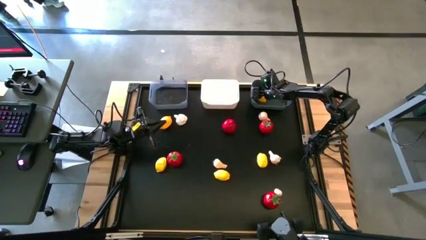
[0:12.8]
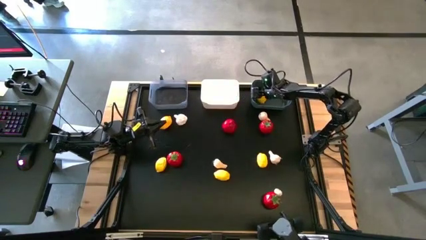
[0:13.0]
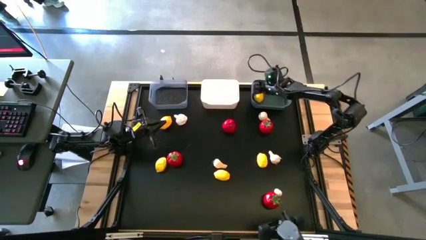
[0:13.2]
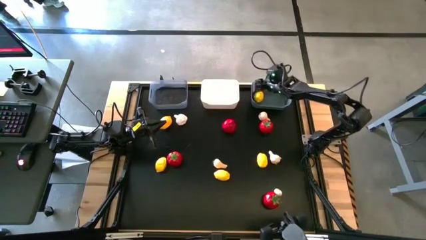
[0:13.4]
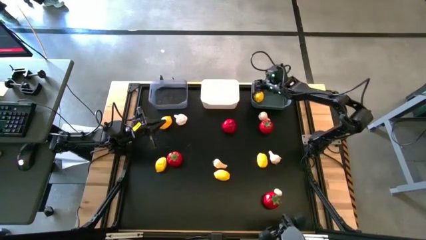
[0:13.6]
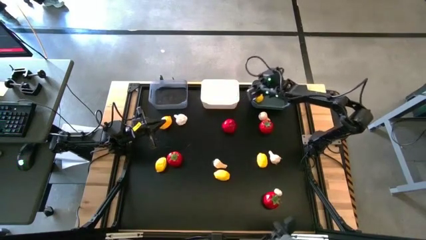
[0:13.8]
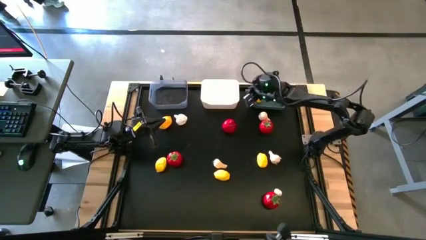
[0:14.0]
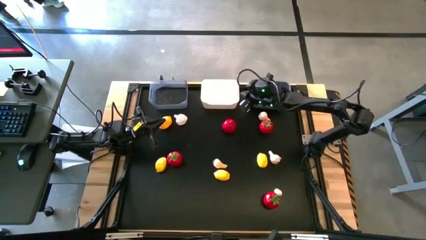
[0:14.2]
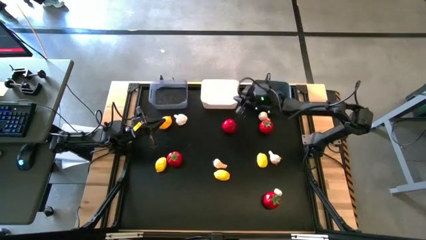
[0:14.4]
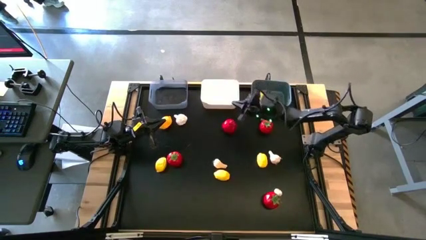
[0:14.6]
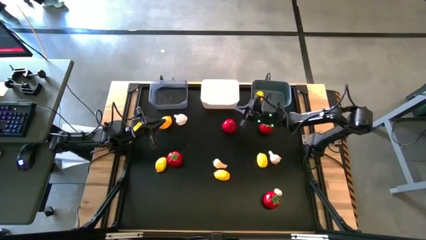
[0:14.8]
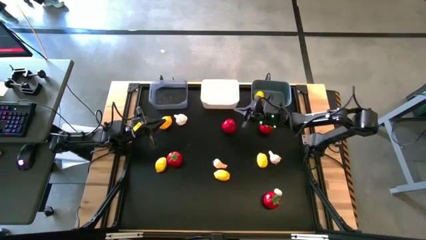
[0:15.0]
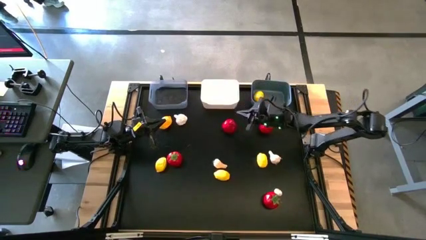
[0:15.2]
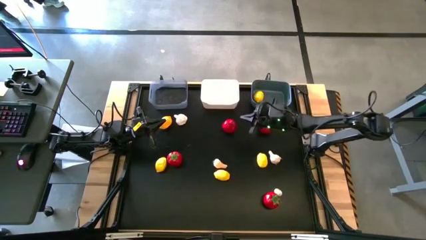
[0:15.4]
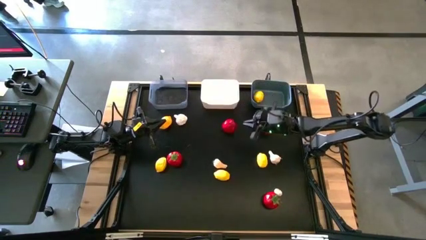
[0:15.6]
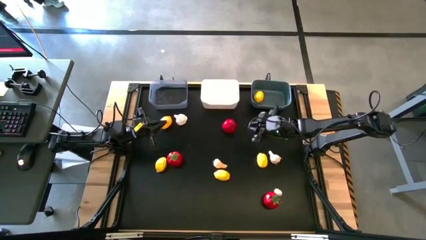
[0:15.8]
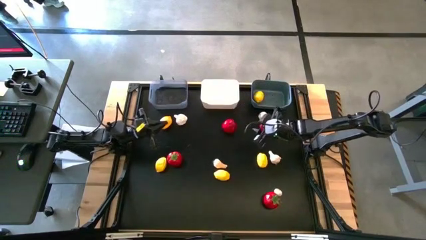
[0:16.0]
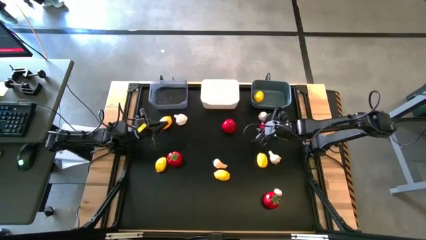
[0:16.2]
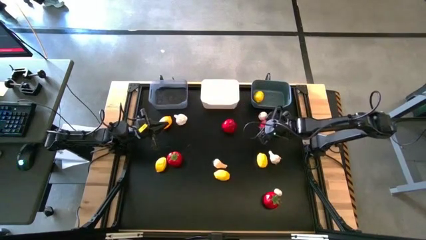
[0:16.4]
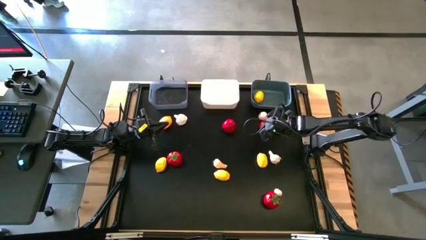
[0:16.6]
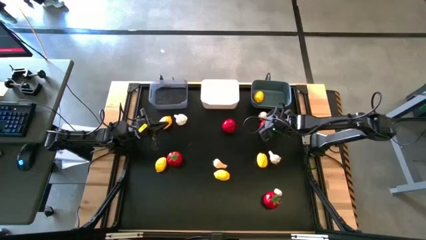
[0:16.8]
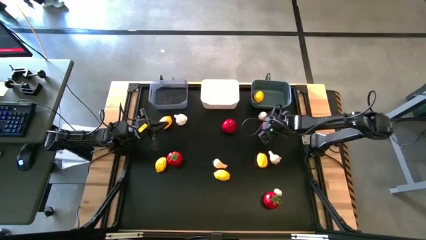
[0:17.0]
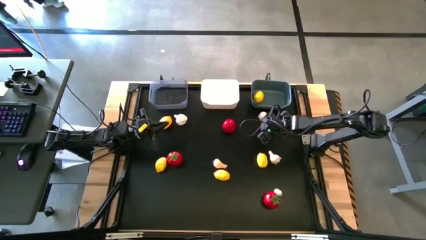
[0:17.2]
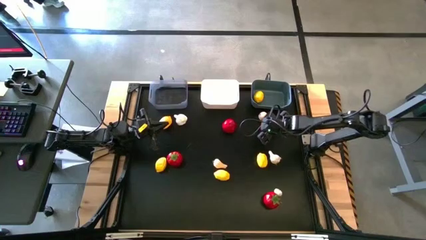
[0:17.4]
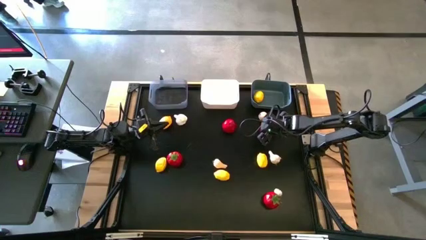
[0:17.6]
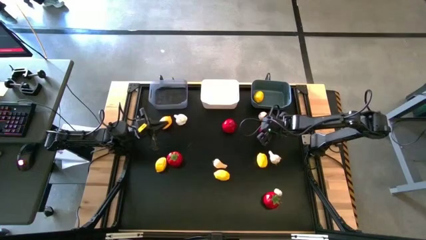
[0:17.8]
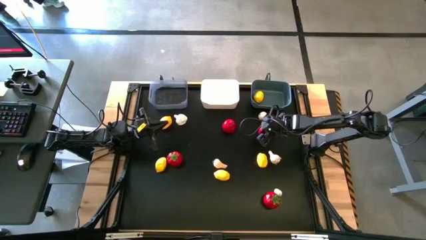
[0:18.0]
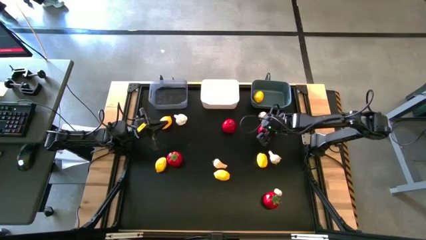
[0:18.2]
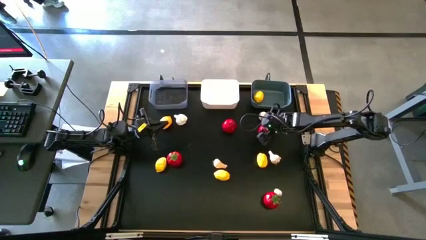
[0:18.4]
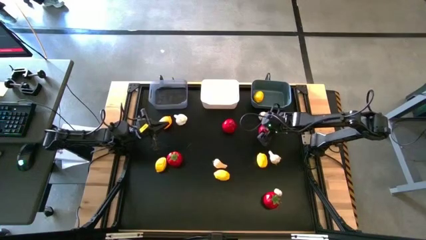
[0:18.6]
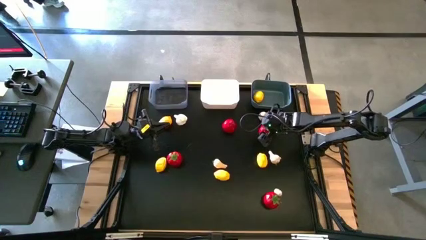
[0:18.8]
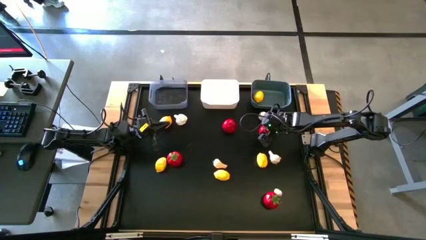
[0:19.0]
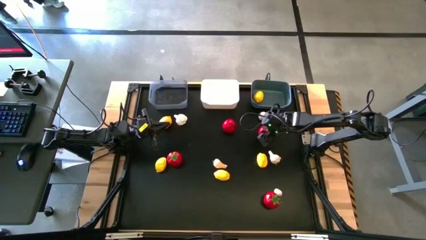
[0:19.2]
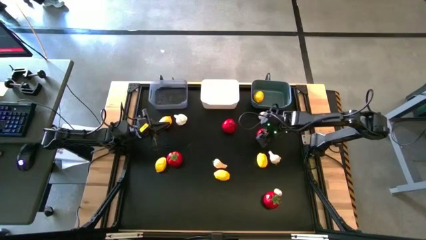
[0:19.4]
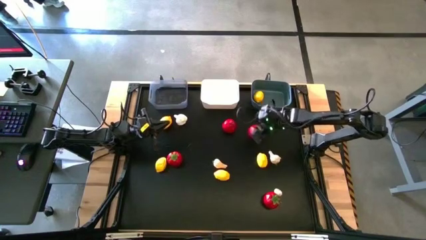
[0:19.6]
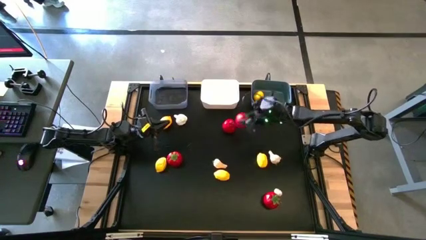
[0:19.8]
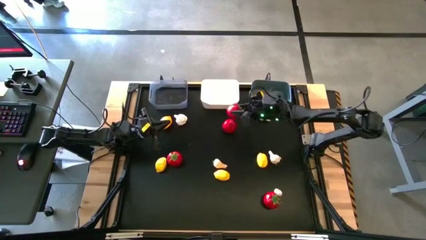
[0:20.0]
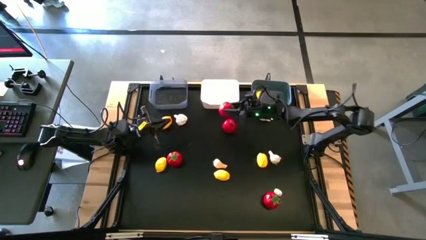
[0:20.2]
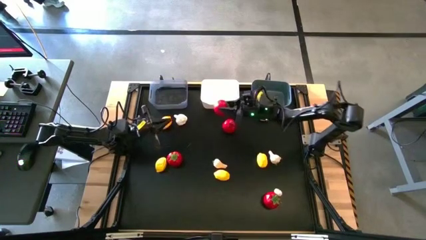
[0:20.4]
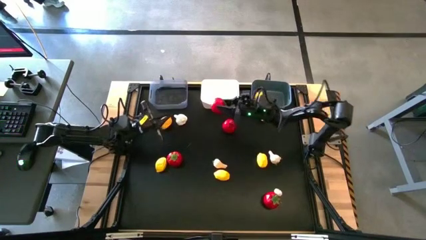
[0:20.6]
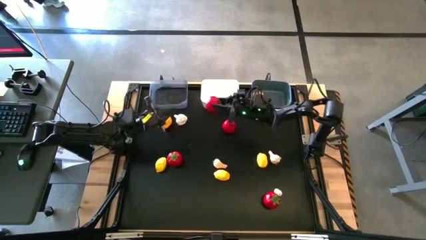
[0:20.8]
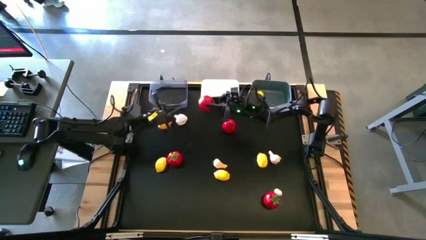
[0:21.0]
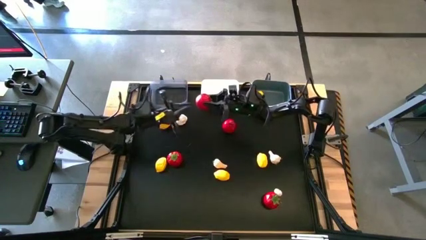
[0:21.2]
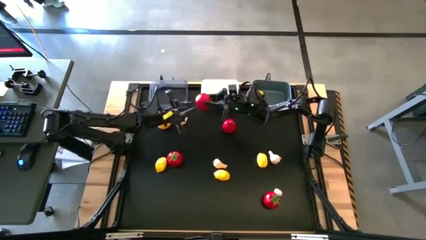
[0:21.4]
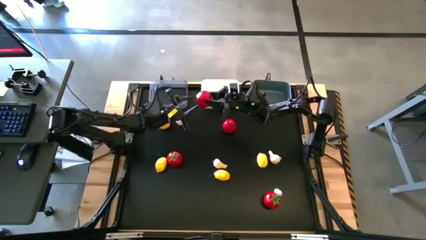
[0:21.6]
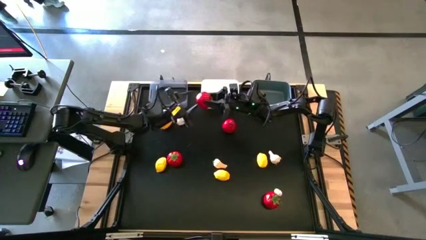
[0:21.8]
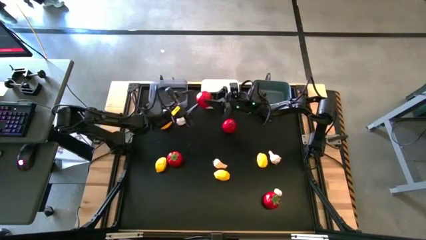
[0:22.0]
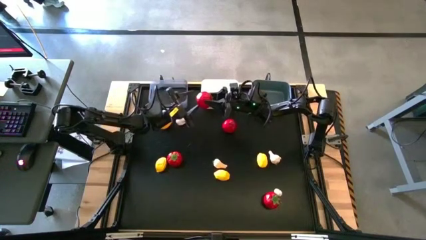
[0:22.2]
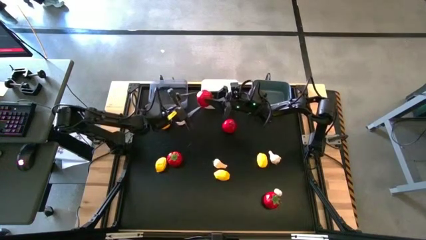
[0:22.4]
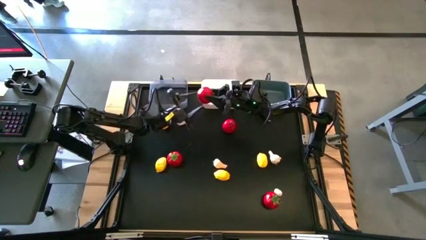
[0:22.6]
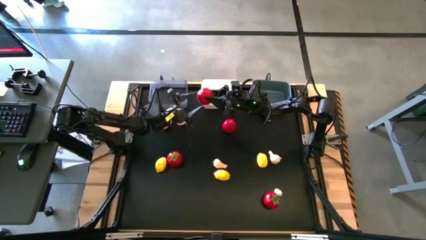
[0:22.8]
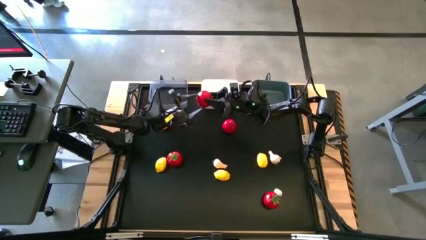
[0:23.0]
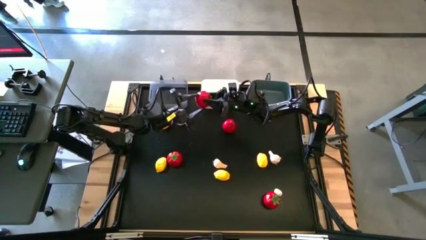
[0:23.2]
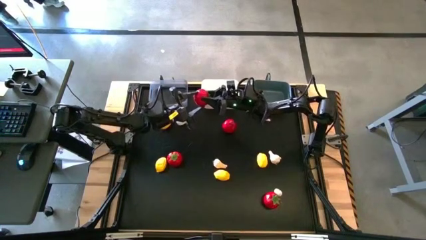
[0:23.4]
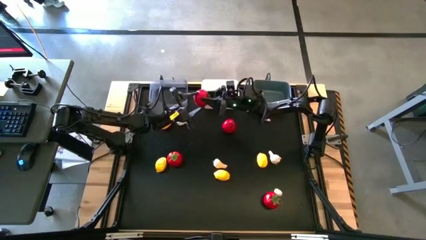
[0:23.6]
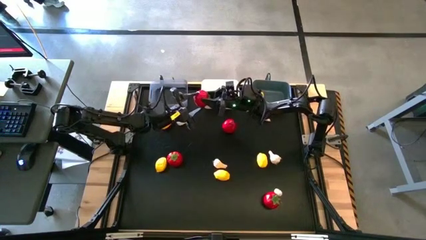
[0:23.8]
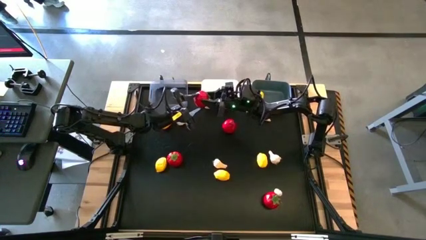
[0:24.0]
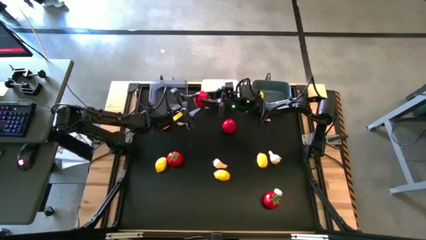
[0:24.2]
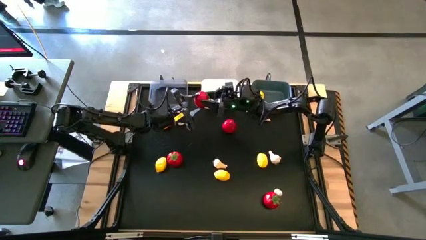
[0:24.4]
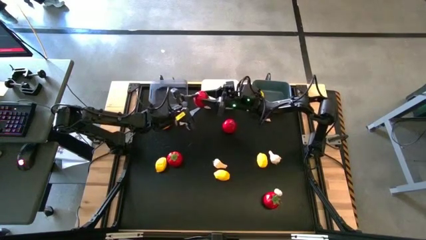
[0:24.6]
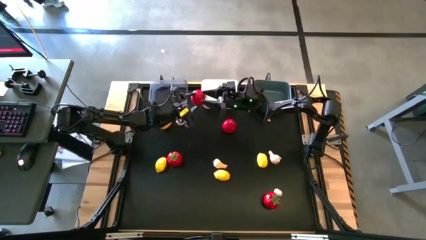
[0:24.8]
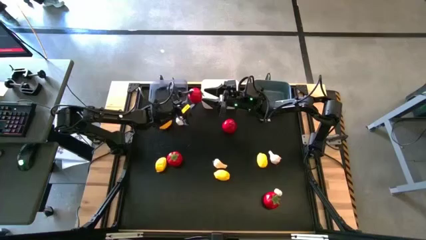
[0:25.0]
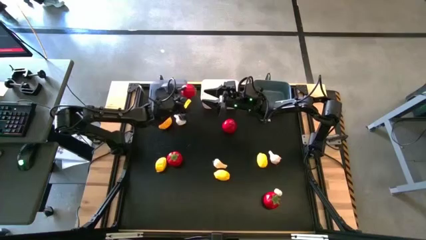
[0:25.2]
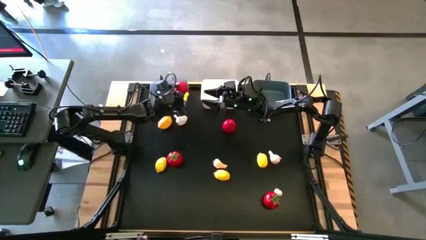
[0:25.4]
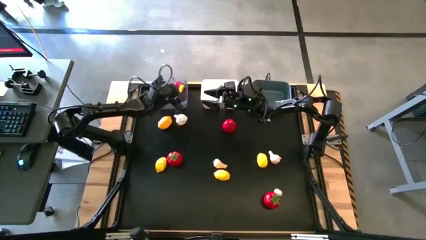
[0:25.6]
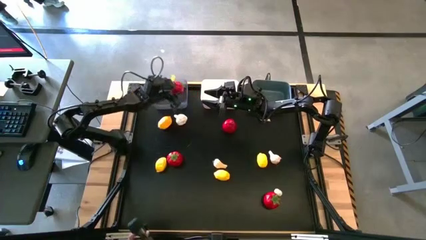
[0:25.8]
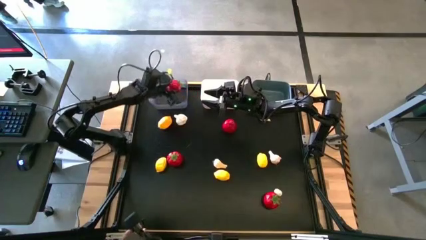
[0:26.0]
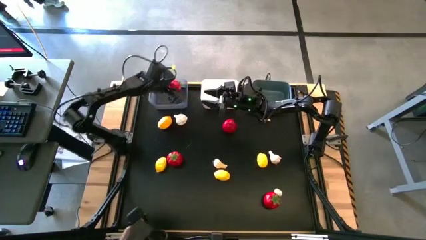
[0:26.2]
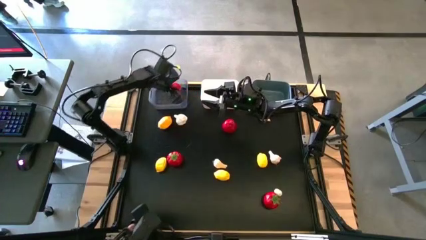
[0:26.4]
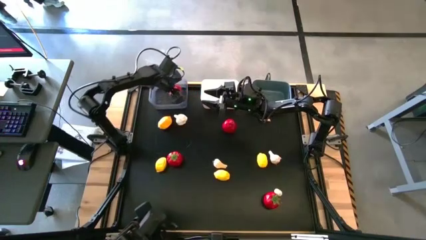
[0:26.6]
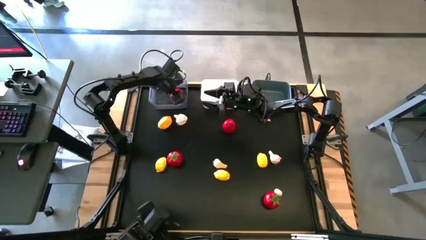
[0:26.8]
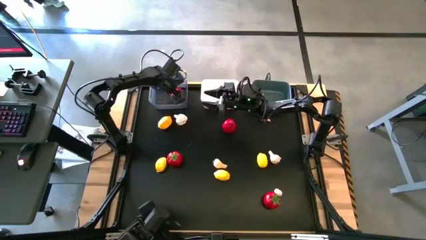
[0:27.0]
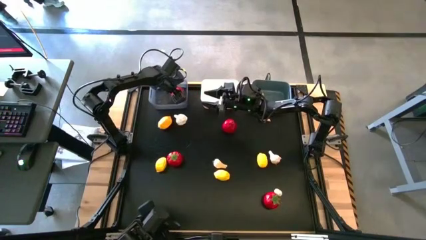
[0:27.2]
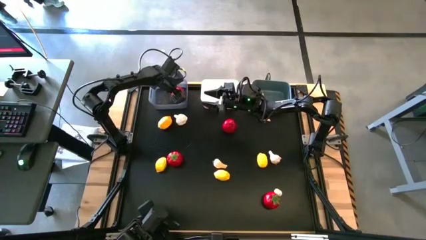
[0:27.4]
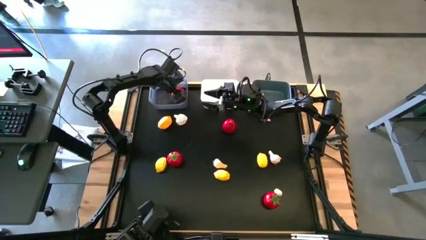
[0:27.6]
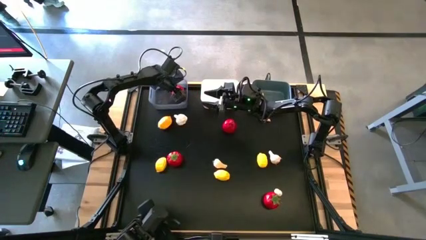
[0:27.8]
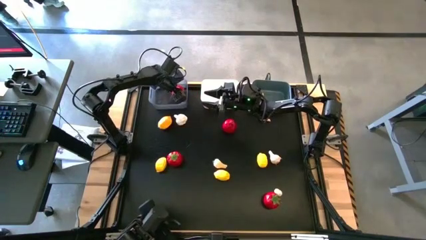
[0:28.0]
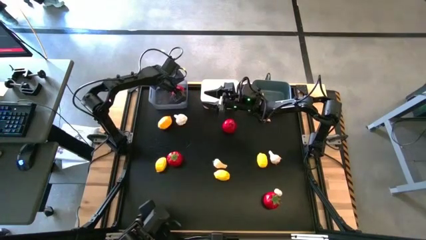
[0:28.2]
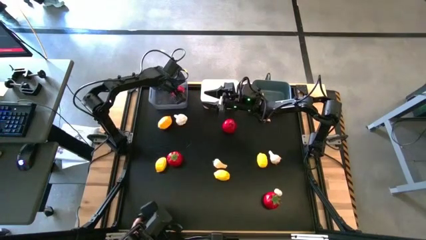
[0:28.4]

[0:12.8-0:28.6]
Task: Sort produce into baskets
Put the tomato into the black bin
